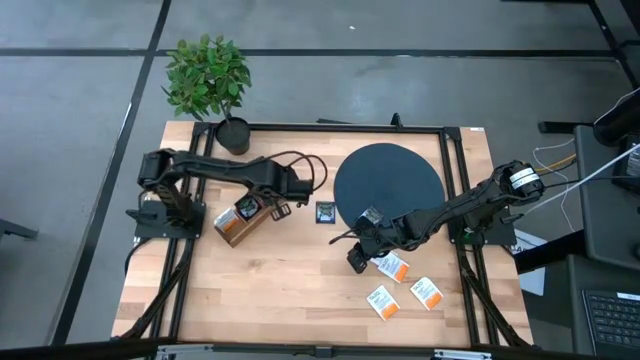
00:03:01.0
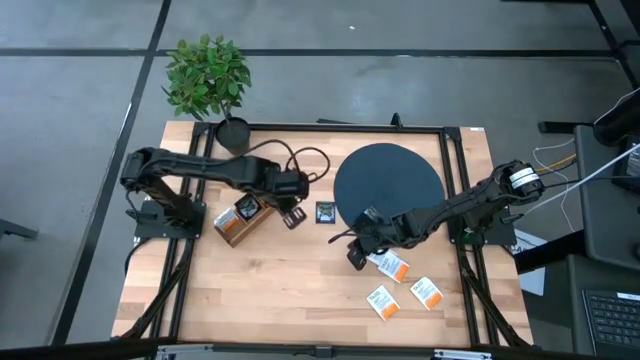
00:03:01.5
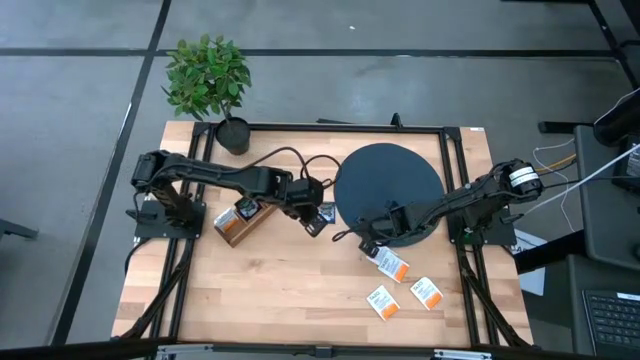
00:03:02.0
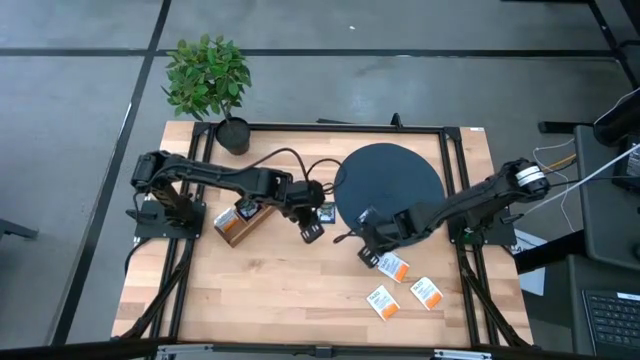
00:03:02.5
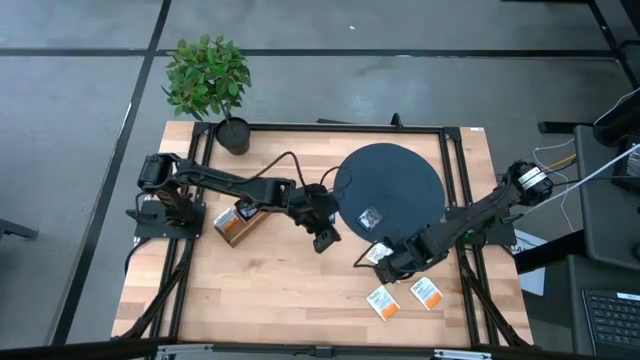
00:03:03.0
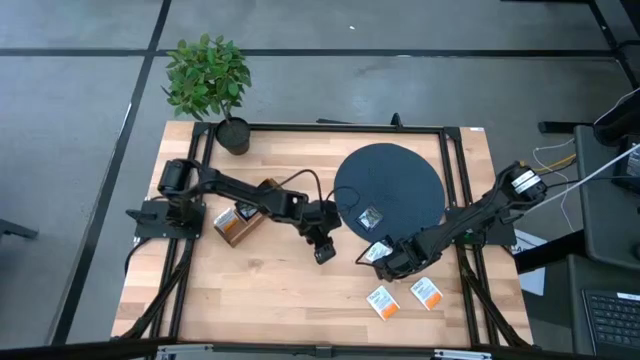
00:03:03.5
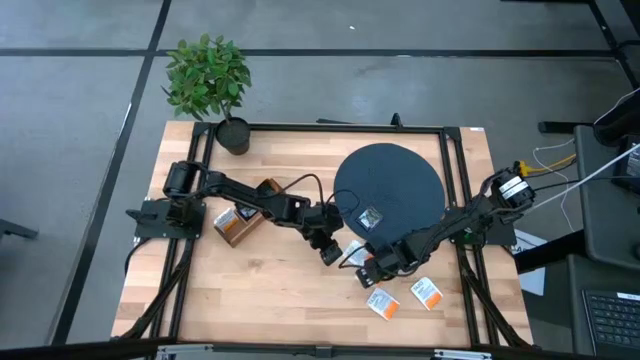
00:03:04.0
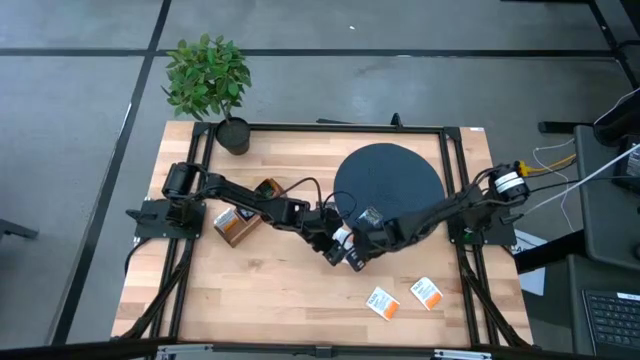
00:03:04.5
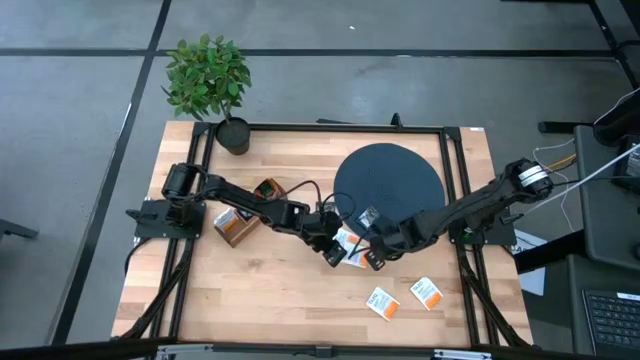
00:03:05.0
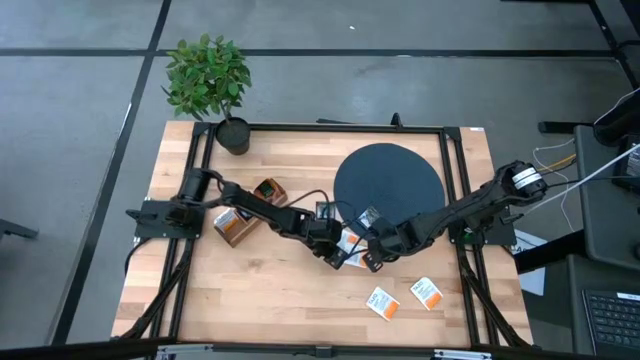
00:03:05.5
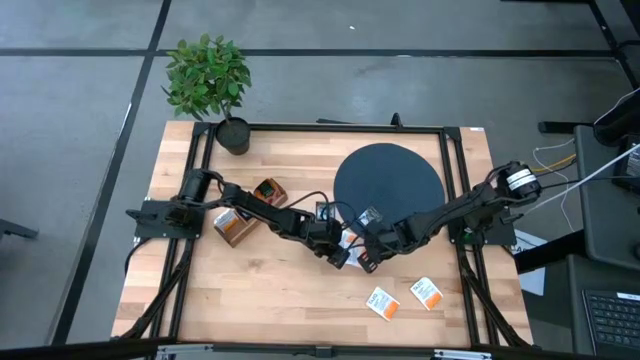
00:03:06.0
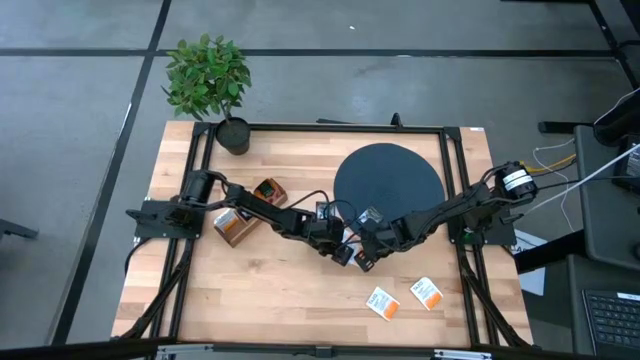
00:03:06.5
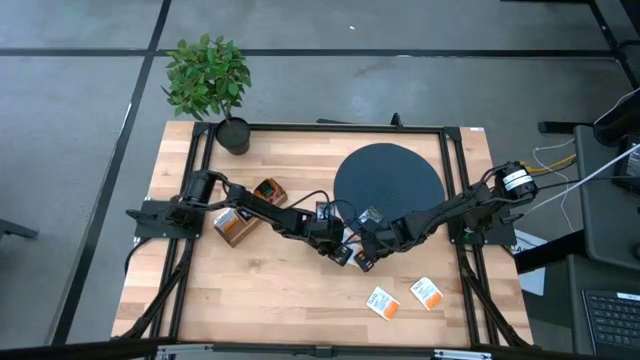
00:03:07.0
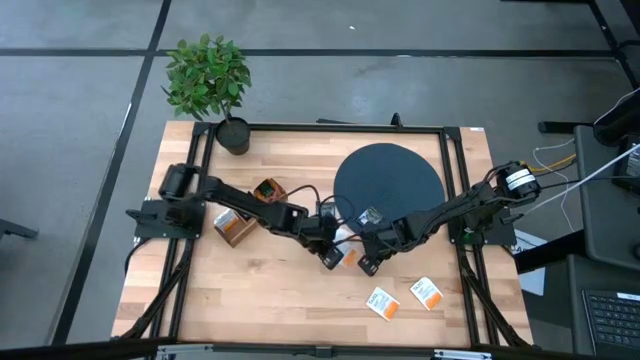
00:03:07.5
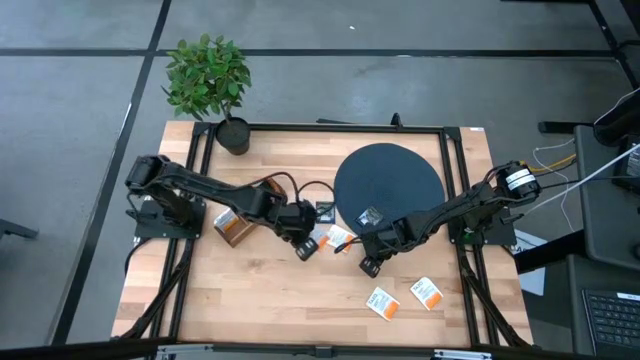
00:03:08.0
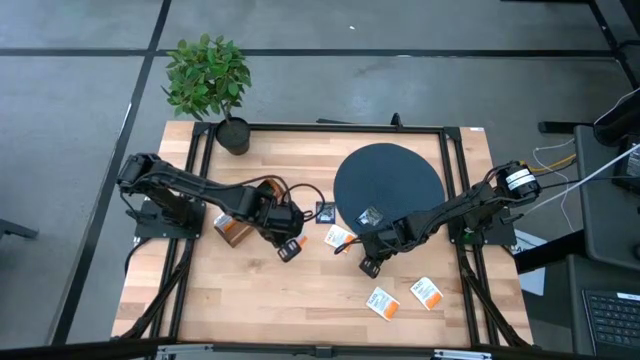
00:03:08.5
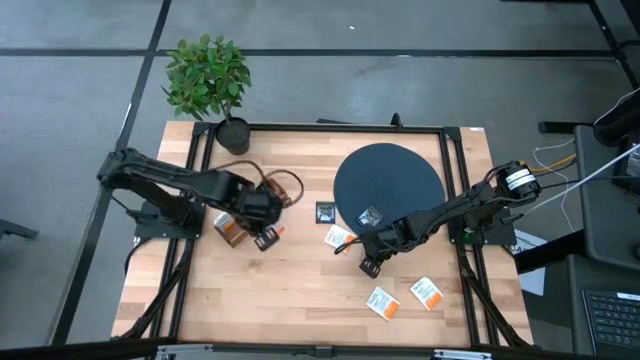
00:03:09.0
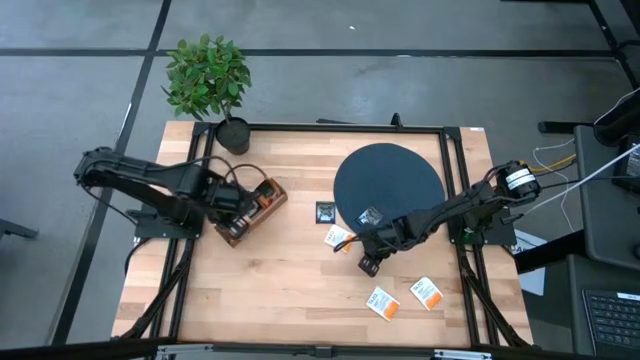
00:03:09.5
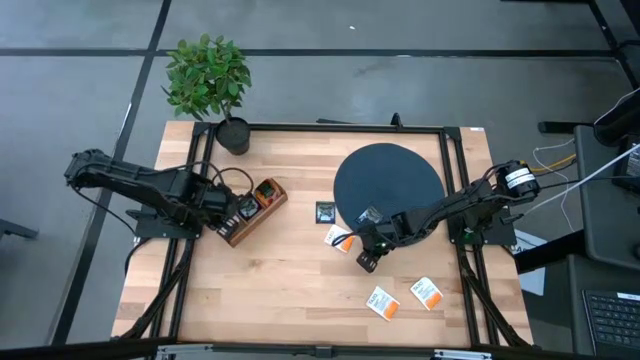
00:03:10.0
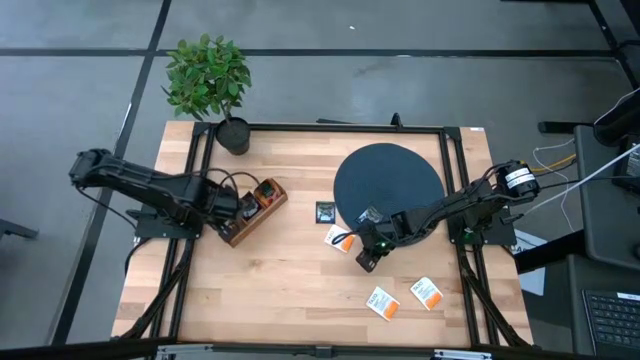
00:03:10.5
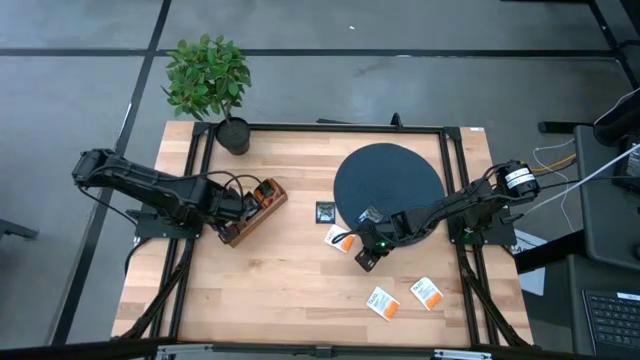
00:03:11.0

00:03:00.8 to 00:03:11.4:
Task: Pick & Place Tea
Put the white tea bag into the left section of the wooden organizer

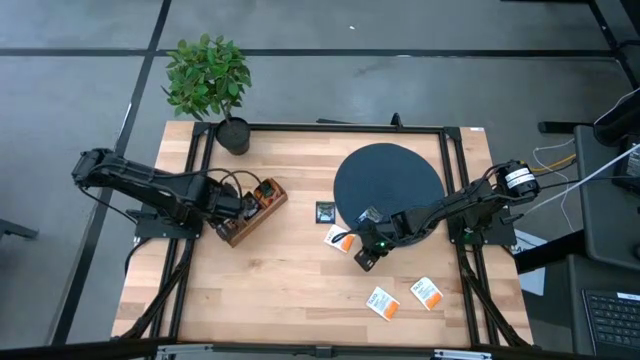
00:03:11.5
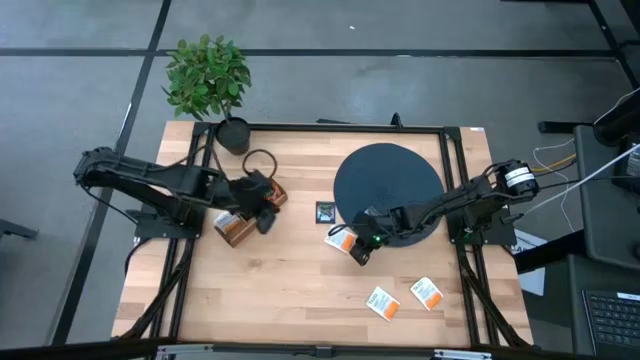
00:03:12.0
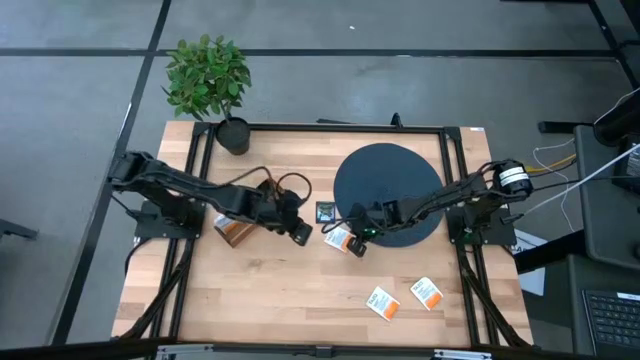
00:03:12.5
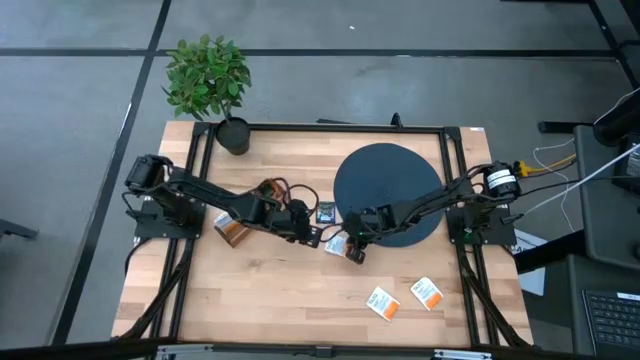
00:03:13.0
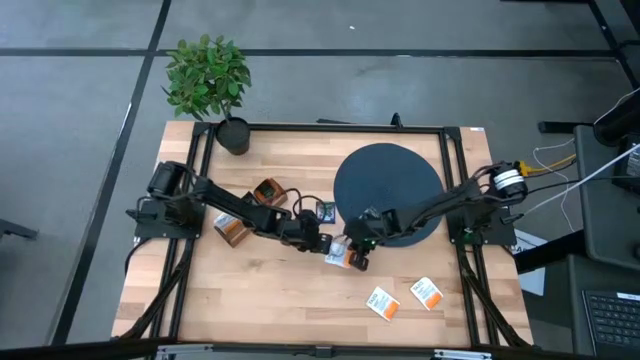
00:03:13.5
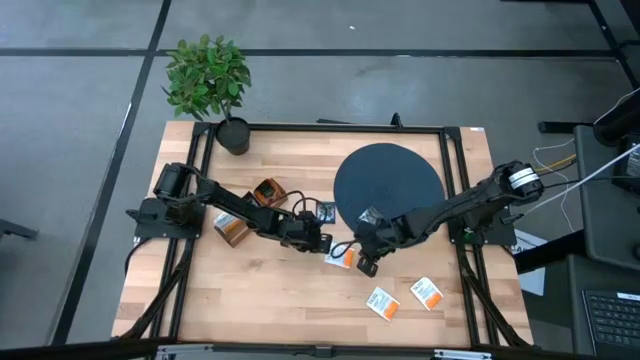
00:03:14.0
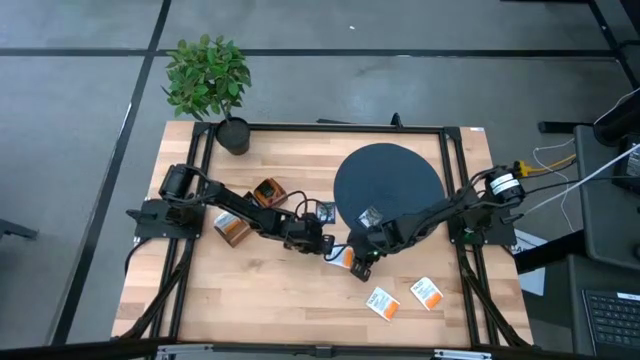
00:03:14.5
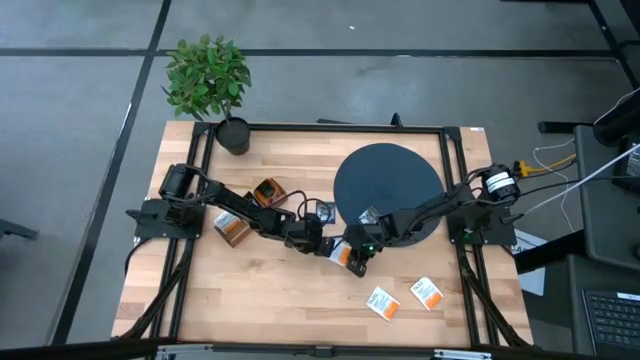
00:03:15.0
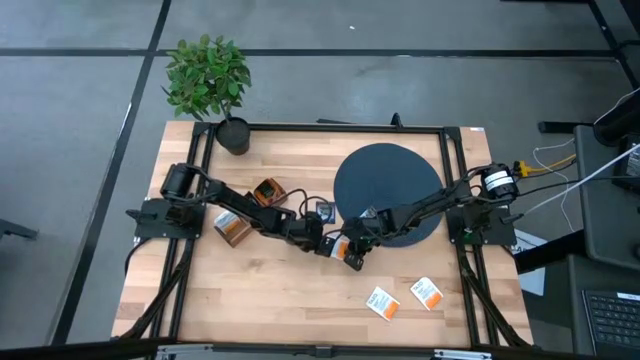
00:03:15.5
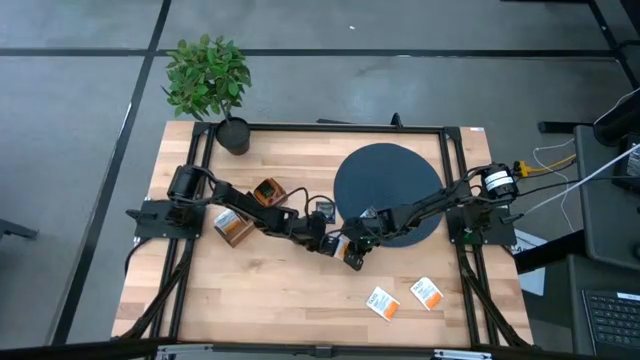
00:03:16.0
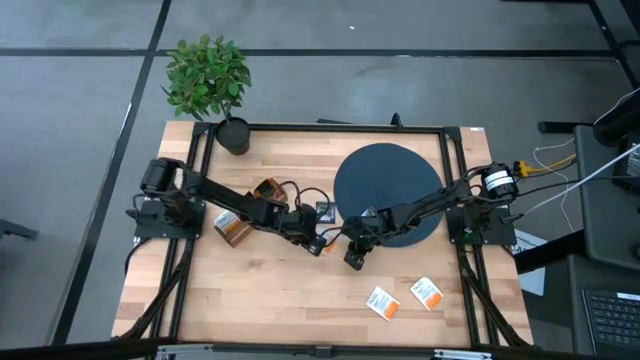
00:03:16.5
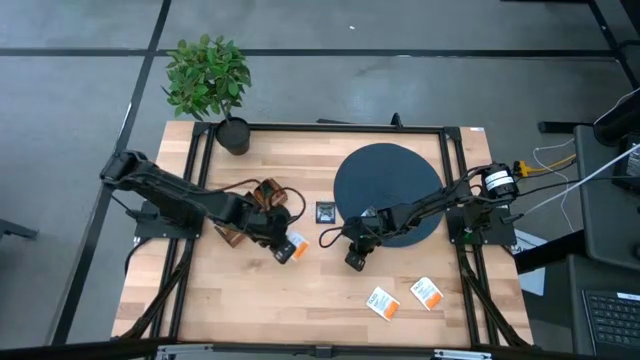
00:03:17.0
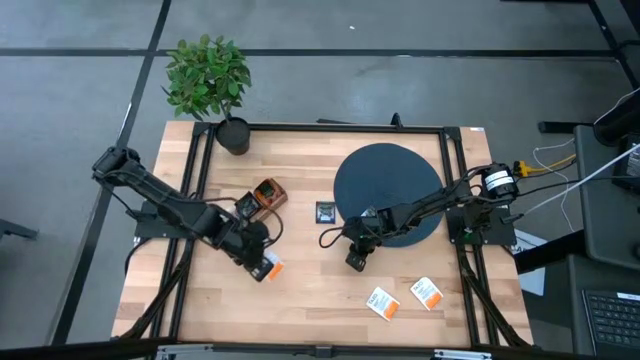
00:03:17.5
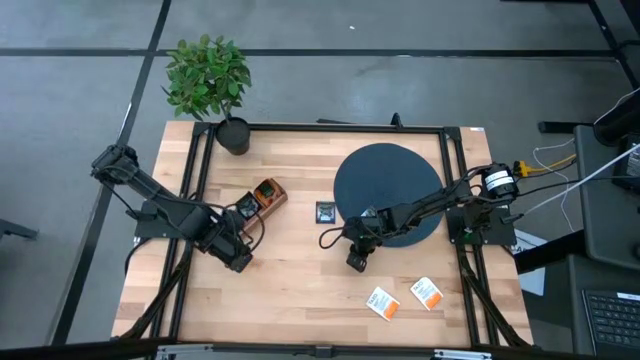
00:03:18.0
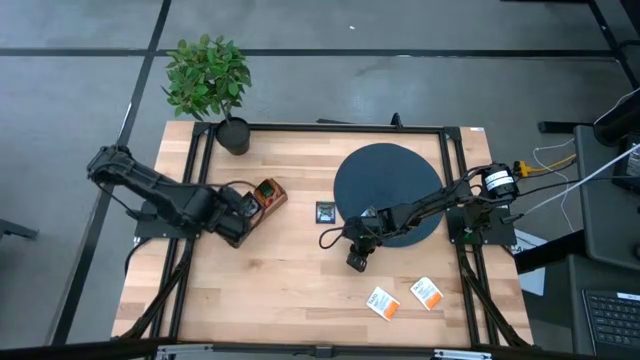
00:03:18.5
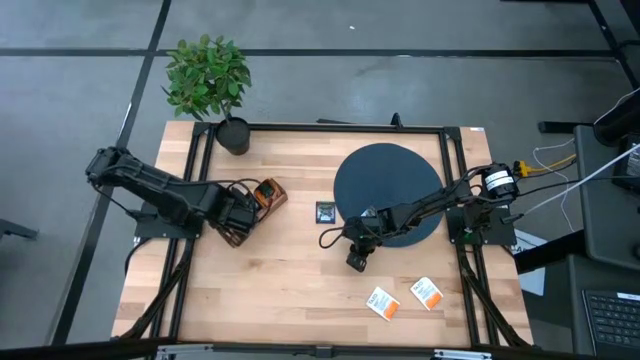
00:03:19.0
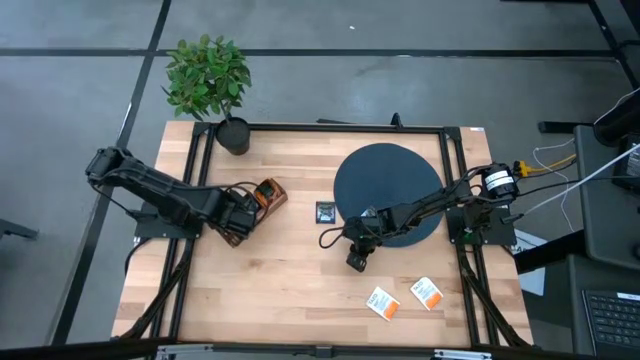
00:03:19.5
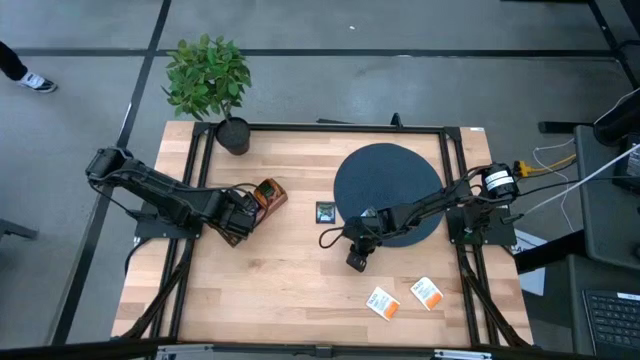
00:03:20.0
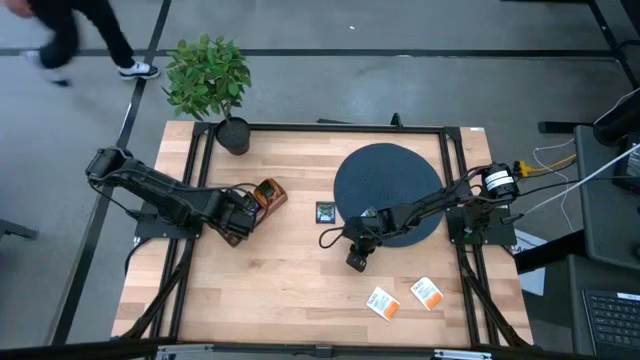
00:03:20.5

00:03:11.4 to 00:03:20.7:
Put the white tea bag into the left section of the wooden organizer

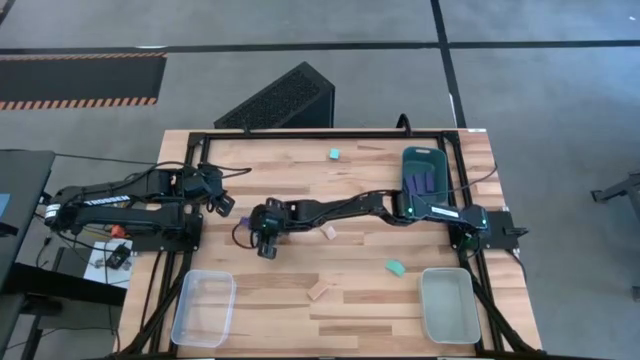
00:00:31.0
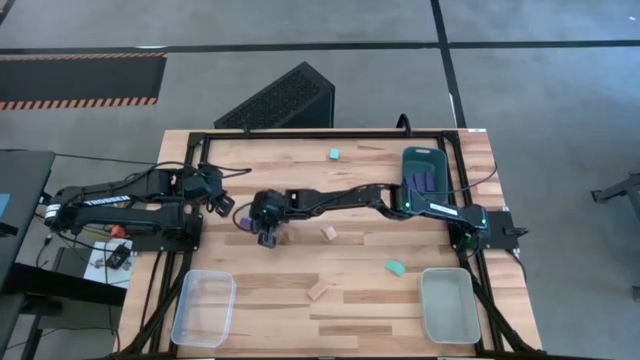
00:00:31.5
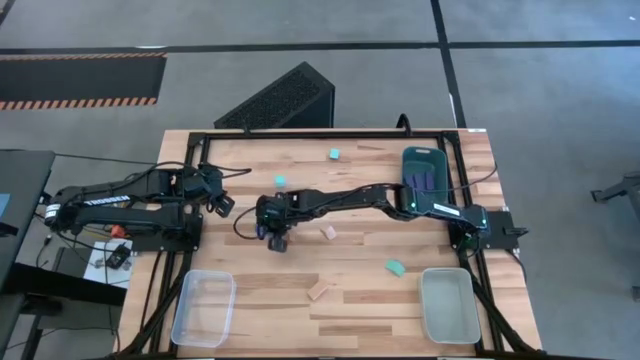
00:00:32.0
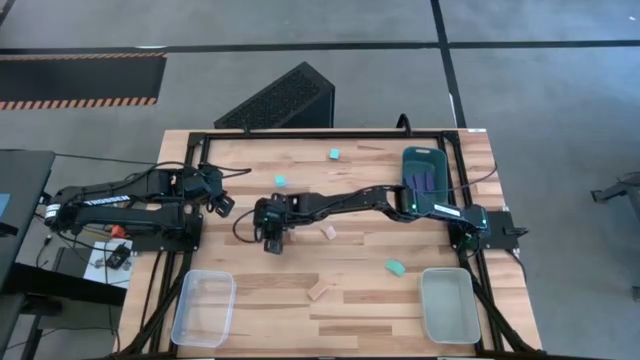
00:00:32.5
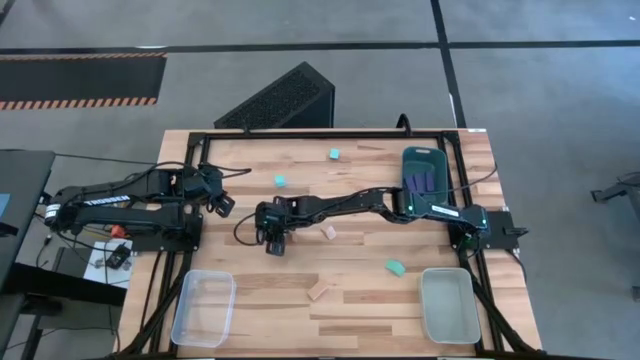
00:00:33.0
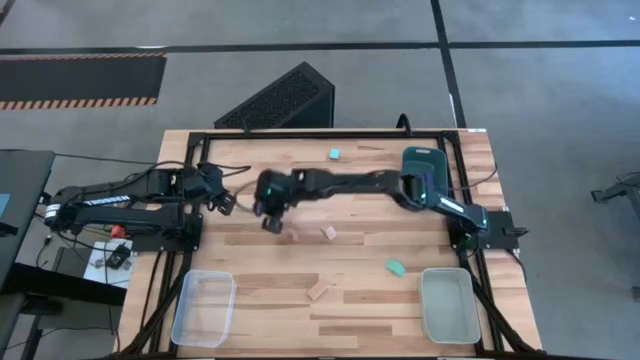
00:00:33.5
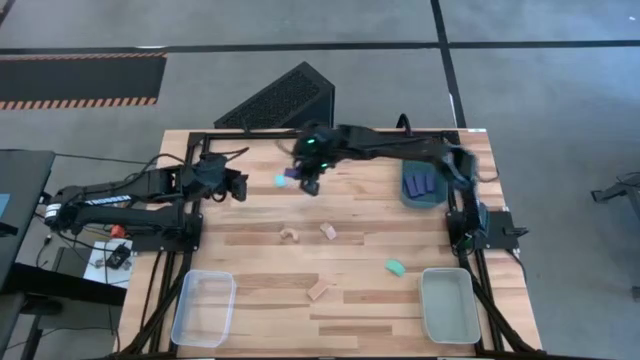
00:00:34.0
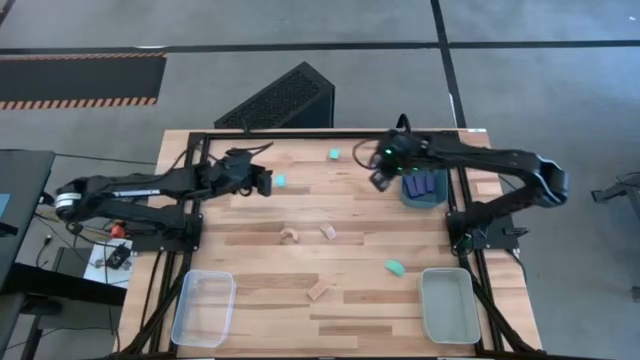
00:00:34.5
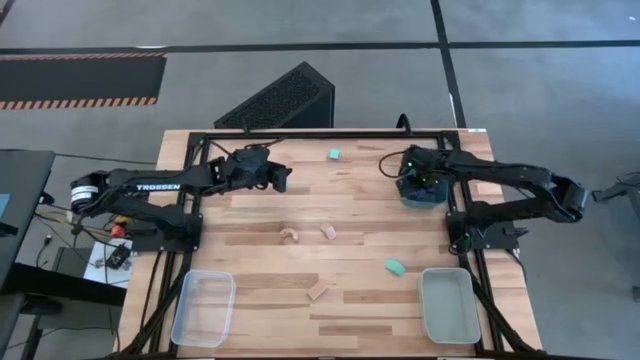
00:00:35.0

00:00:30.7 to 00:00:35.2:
Task: Sort & place blocks by color
Put the blue block into the green bin
